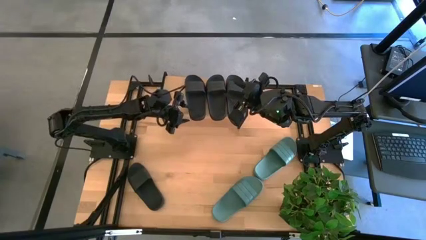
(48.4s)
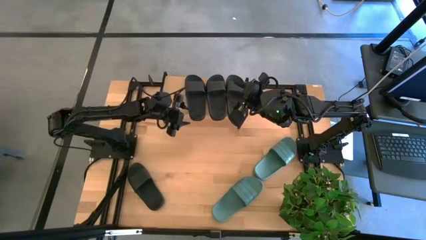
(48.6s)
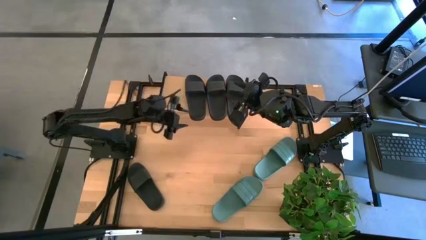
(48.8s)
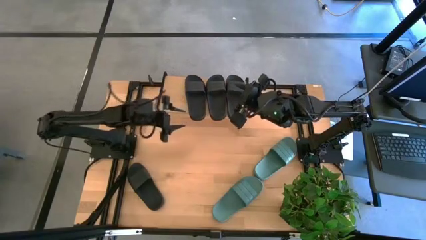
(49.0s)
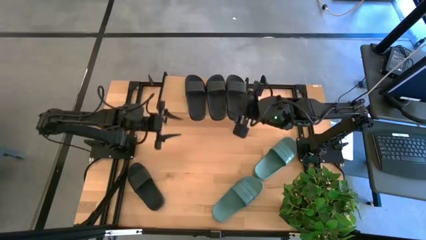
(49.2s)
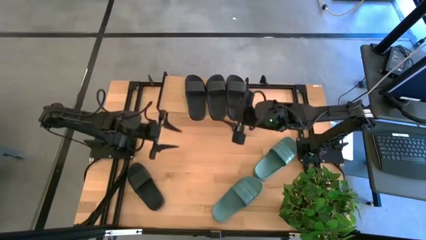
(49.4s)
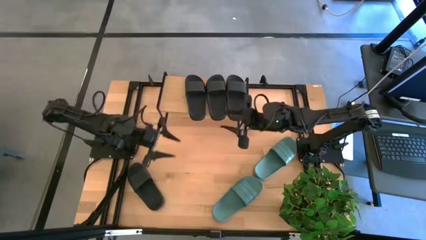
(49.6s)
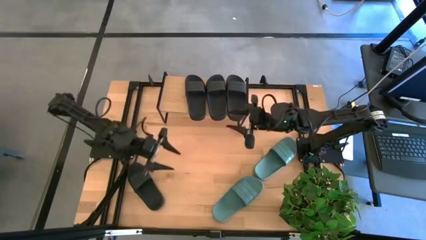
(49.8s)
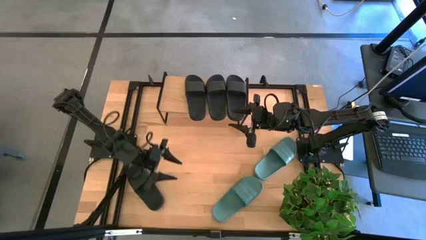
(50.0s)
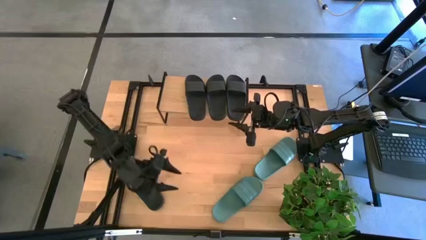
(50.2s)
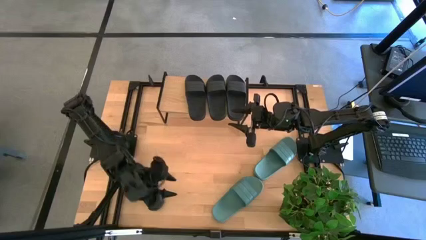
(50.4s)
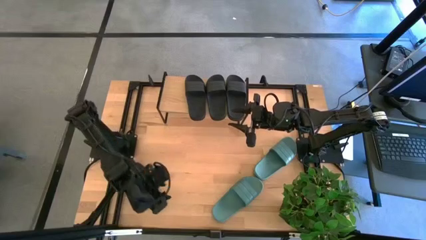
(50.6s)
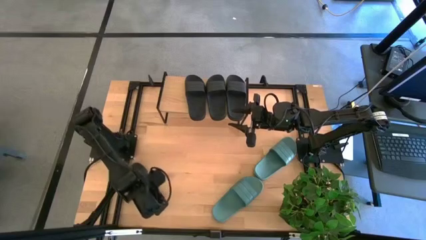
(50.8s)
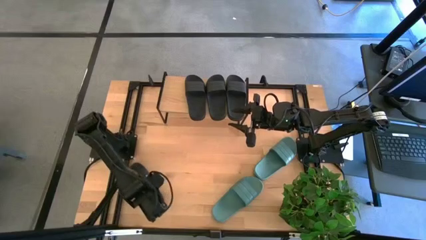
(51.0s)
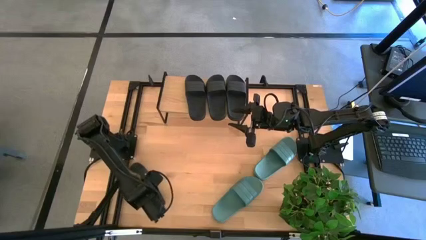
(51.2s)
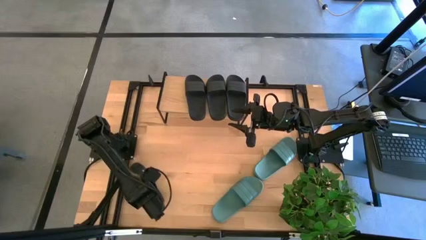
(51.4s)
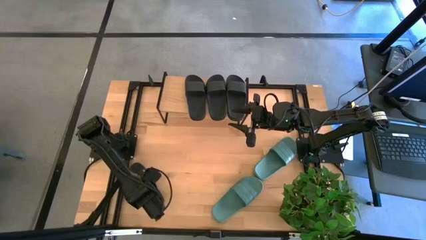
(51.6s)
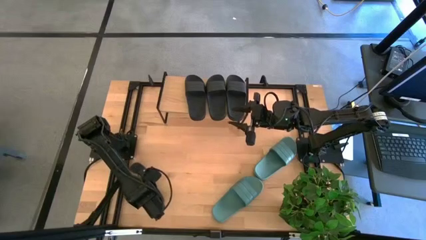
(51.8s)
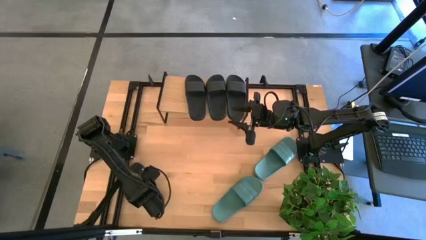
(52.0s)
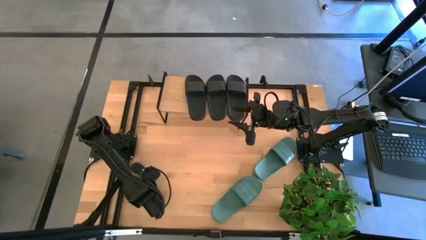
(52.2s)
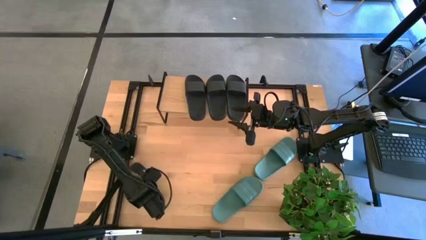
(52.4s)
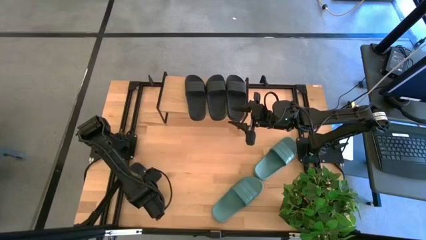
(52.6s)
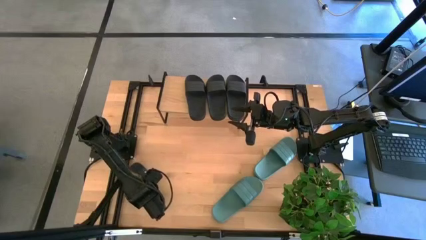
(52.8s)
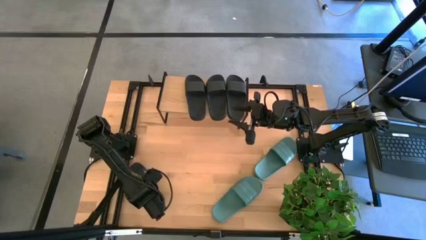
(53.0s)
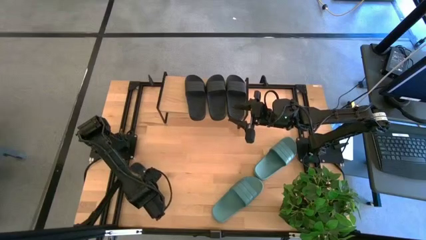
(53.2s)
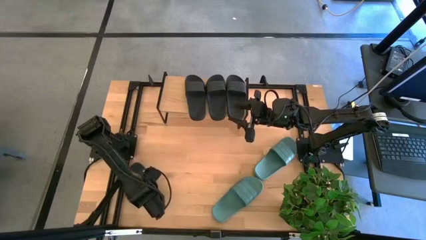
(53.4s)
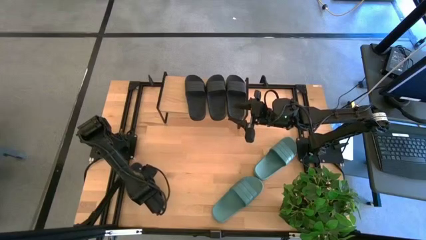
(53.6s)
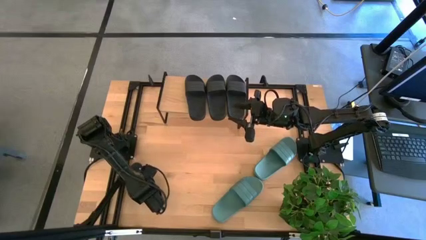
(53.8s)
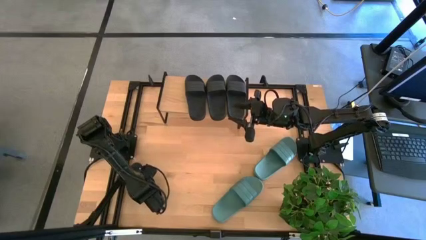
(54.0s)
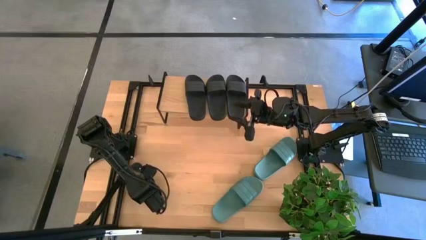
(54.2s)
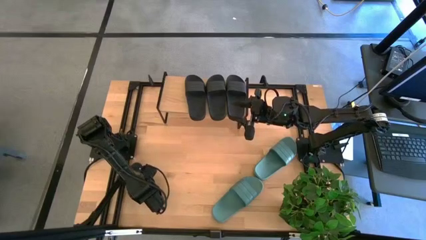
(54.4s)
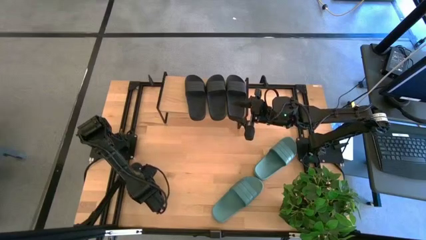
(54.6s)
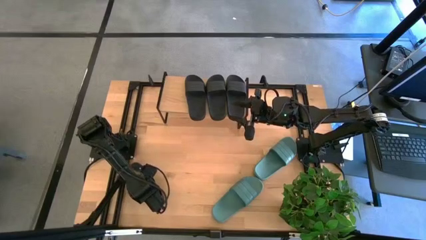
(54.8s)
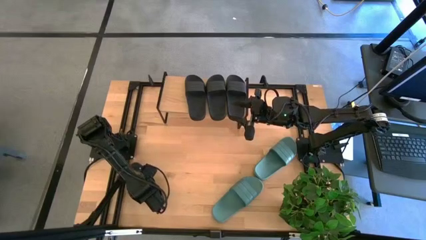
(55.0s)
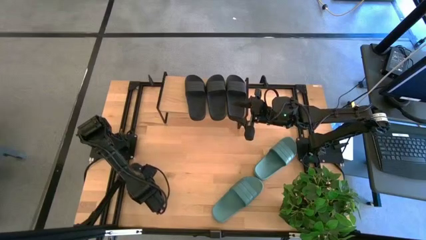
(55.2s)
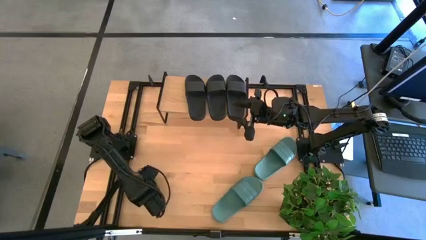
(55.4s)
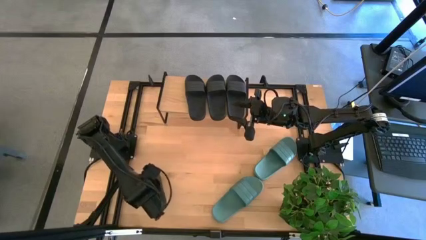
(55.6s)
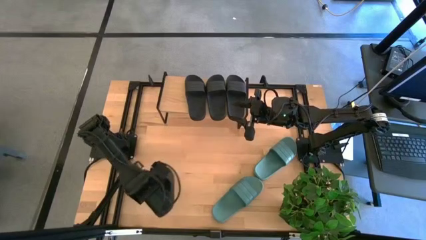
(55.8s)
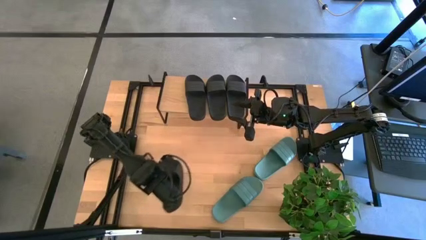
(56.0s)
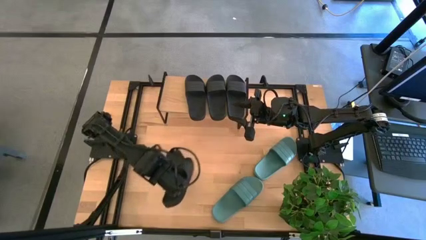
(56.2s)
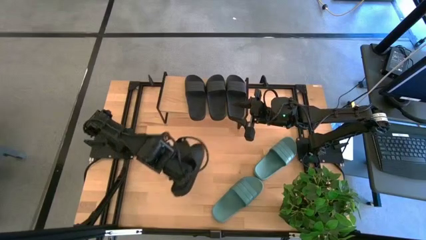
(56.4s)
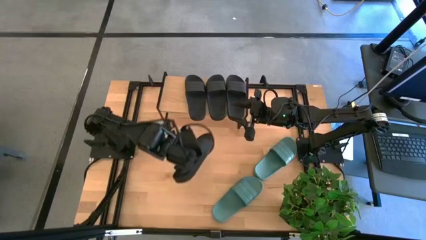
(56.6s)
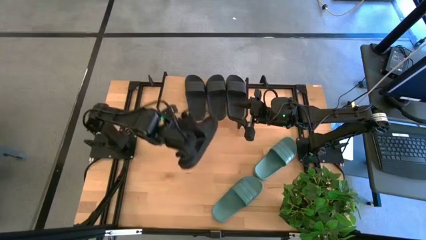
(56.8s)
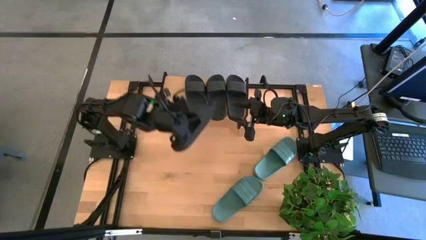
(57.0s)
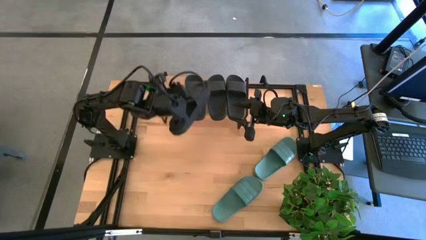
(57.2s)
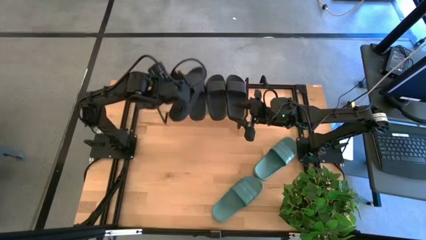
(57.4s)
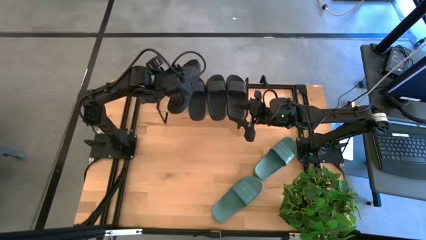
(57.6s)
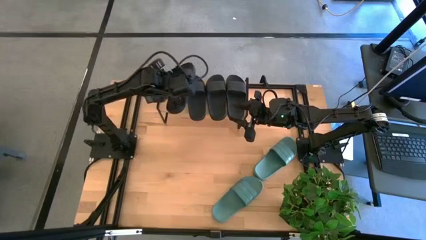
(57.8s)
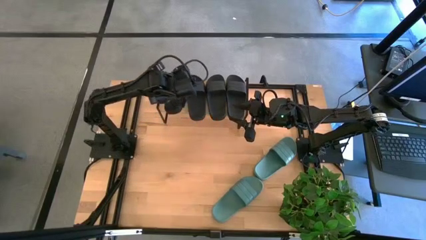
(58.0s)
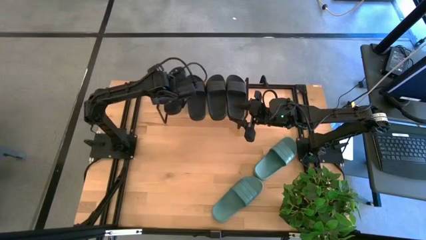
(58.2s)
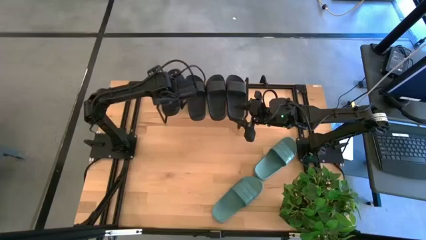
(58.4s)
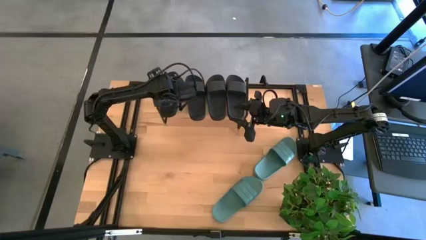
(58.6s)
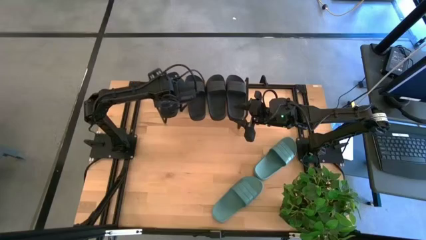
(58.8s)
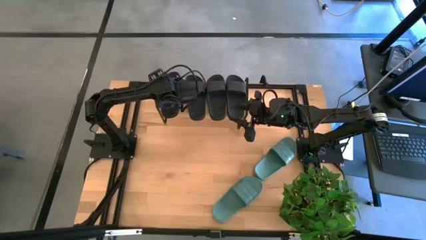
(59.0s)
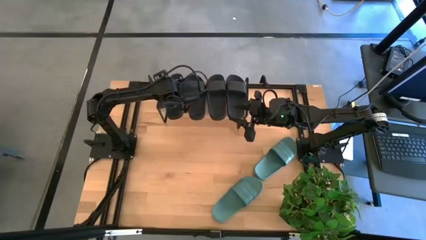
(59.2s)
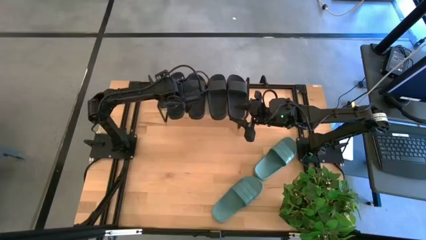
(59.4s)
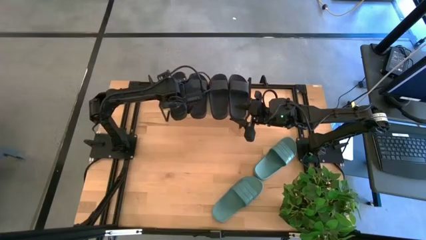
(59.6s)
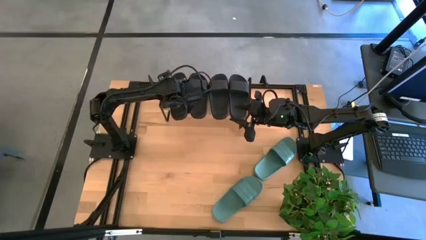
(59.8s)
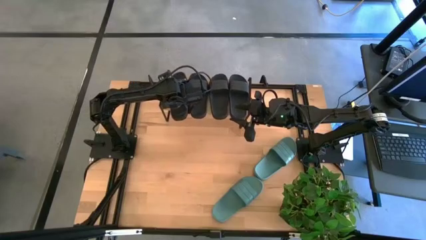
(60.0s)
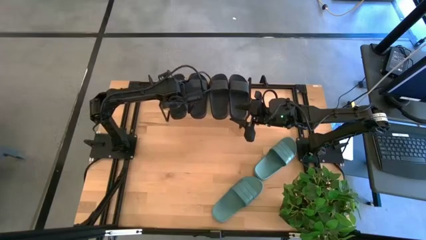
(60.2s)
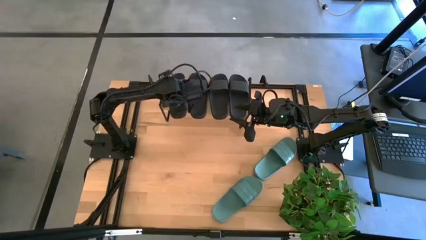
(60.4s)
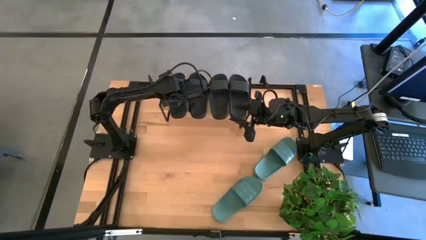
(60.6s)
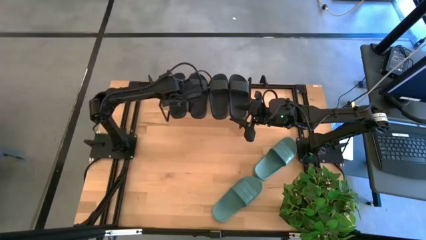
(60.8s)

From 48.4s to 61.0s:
Task: Pick and place slides into the shelf
Put the black slide on the shelf
